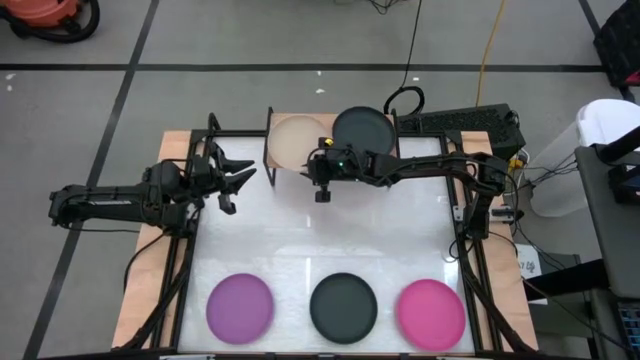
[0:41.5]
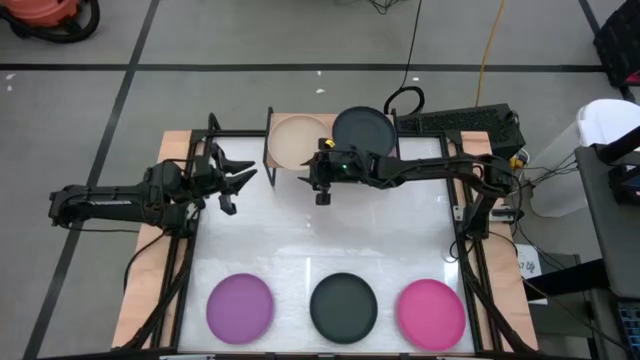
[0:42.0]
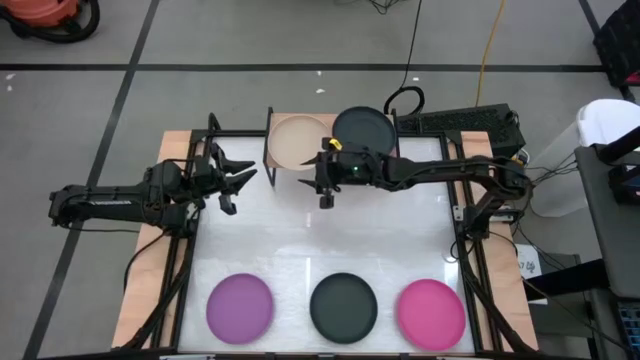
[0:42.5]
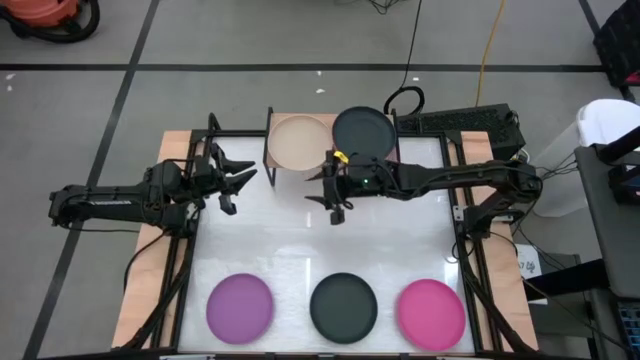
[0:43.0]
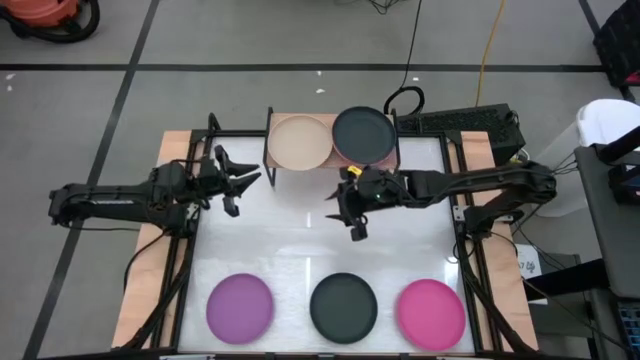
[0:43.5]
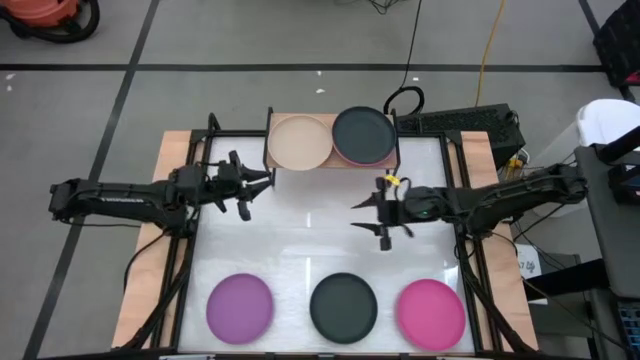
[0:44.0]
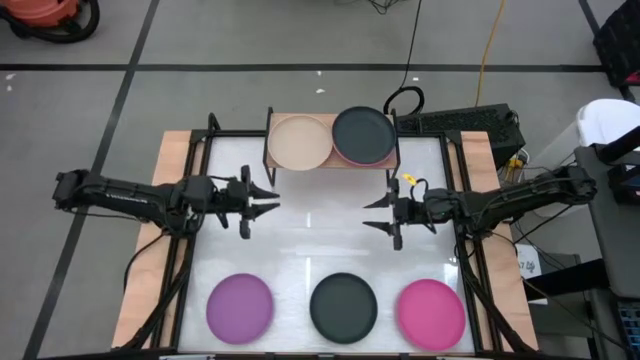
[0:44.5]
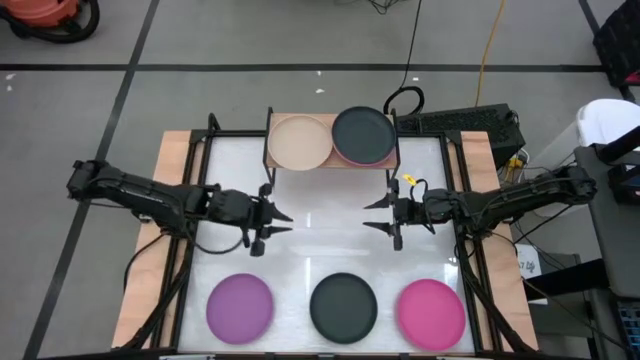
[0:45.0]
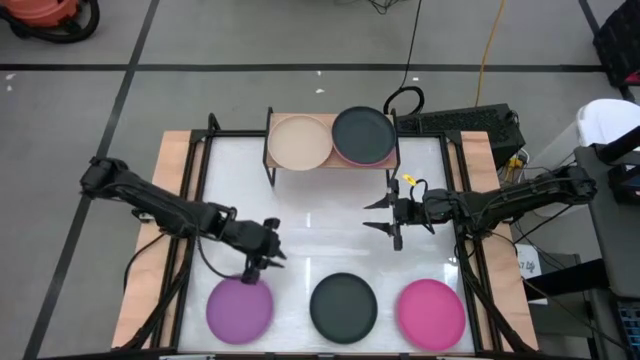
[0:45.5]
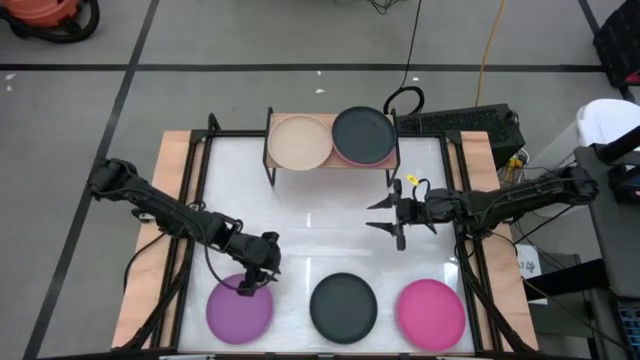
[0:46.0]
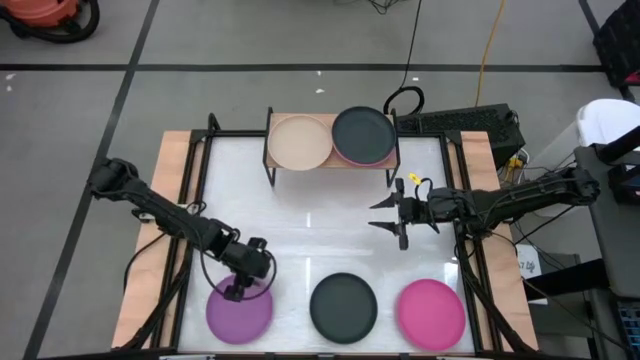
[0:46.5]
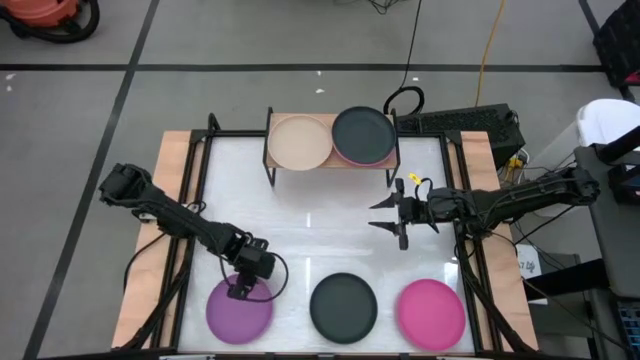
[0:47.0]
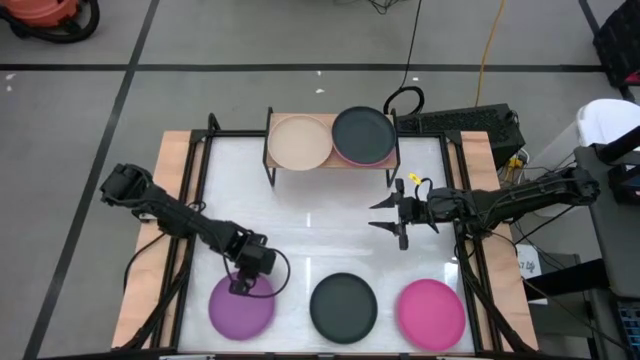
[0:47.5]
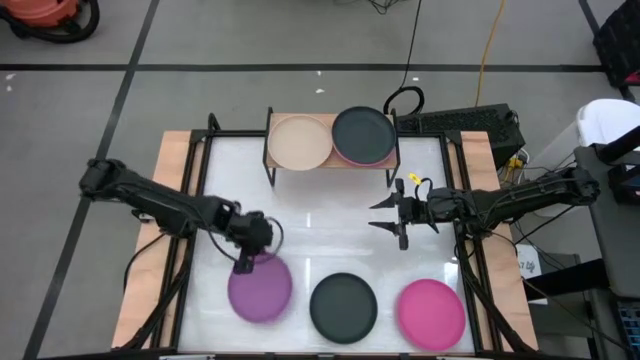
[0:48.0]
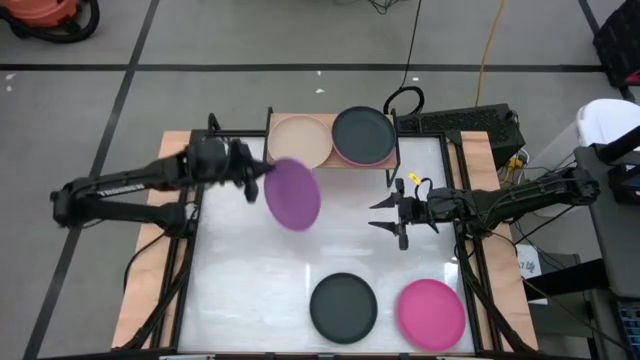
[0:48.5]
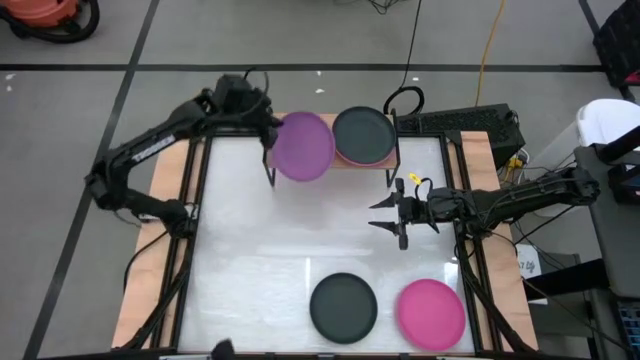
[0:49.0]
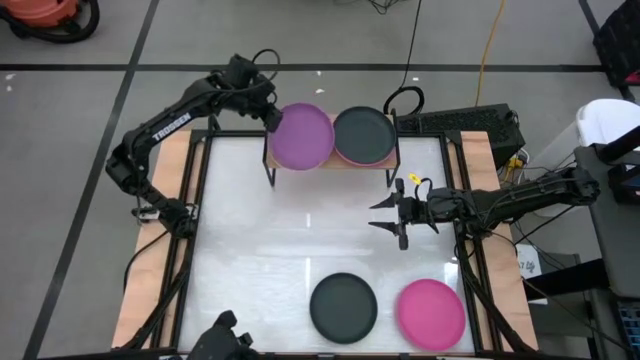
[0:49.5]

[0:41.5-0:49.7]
Task: Place and stack plates onto a shelf
Stack the violet plate on top of the gray plate on the shelf

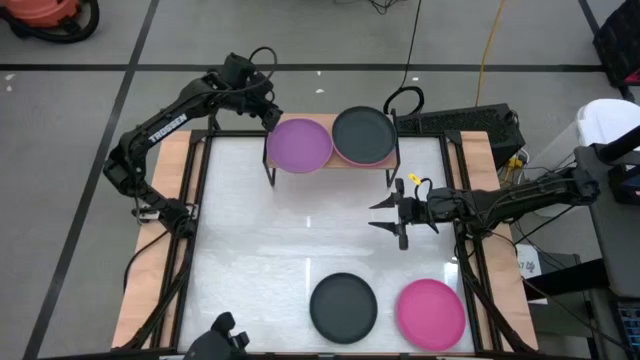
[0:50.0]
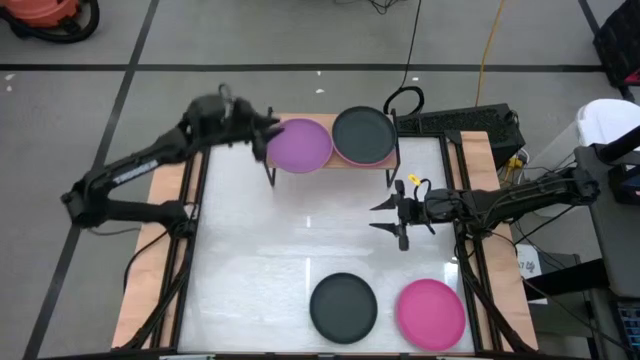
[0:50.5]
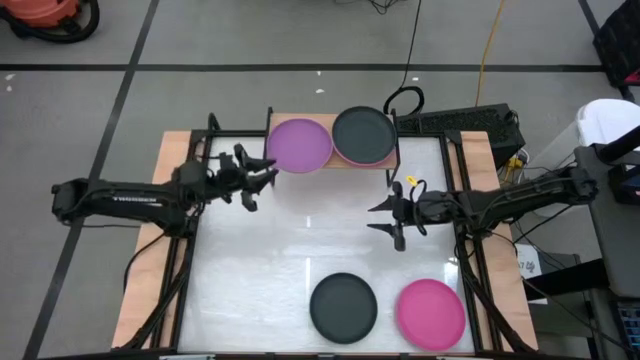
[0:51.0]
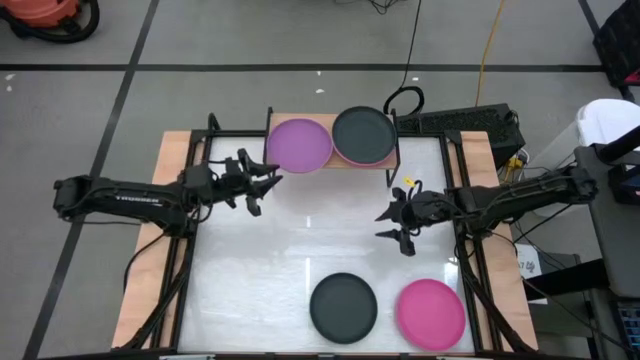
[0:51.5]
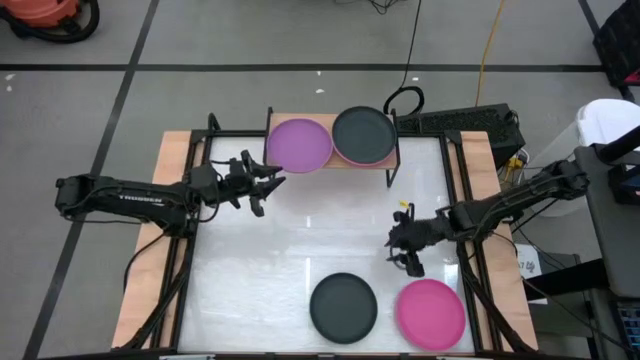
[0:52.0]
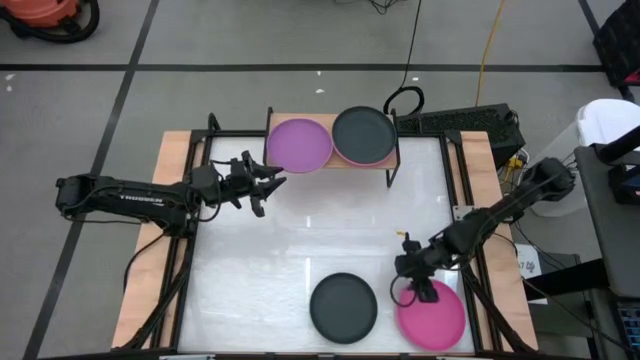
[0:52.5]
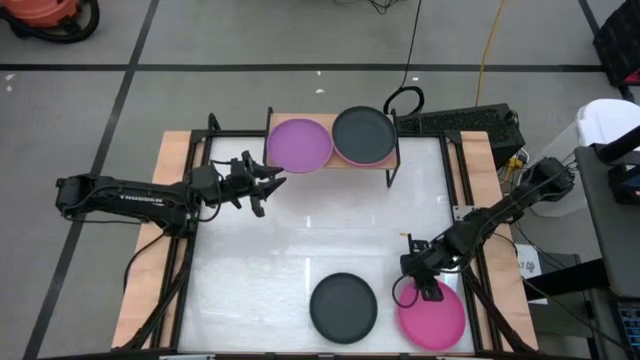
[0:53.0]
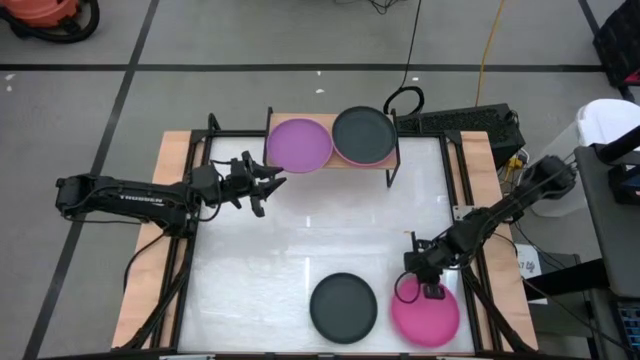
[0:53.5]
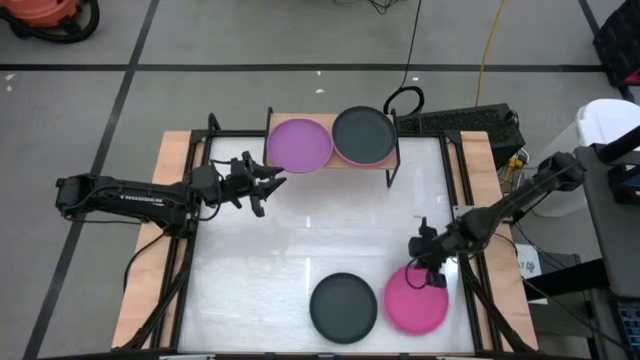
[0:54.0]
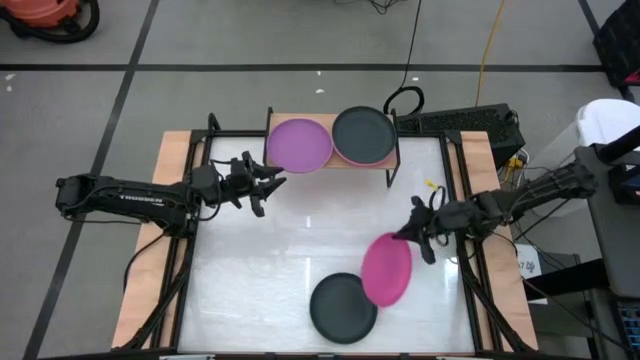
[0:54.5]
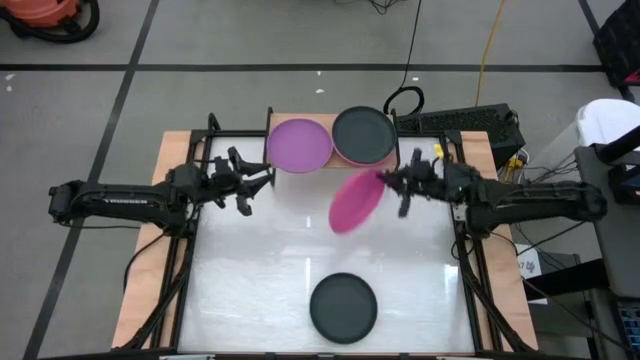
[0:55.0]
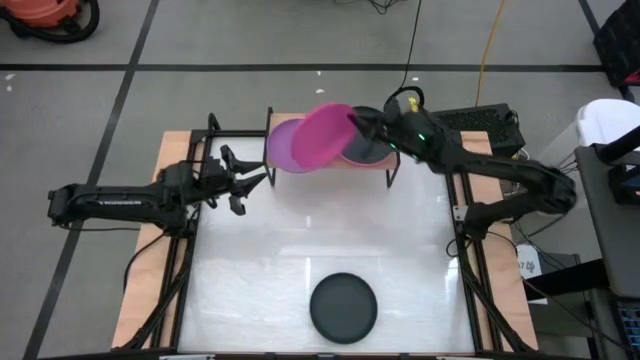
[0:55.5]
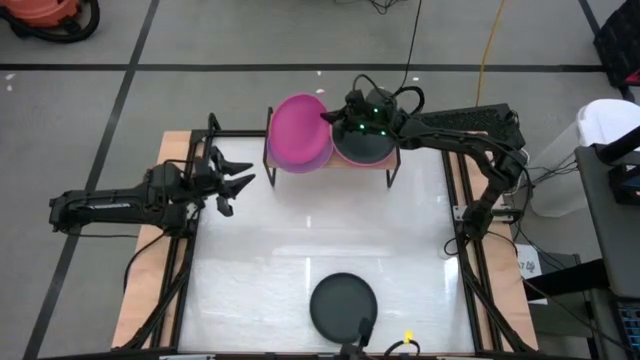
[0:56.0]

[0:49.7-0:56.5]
Stack the pink plate on top of the violet plate on the shelf

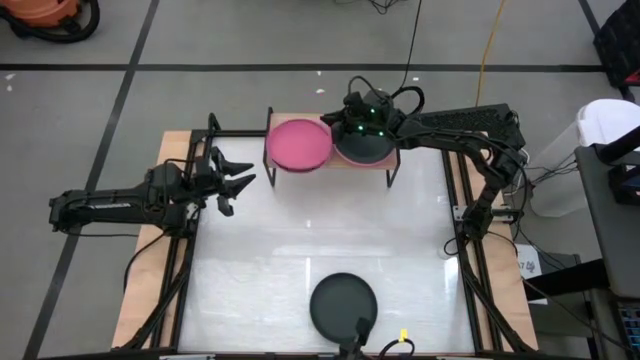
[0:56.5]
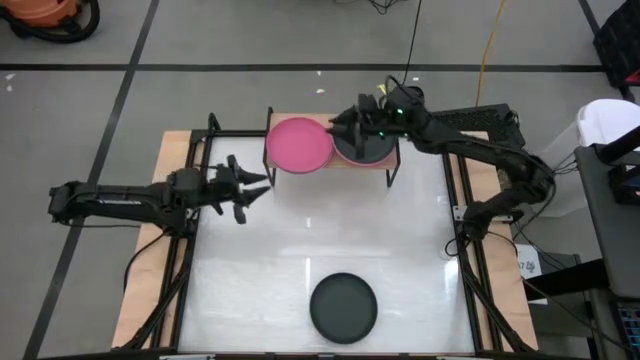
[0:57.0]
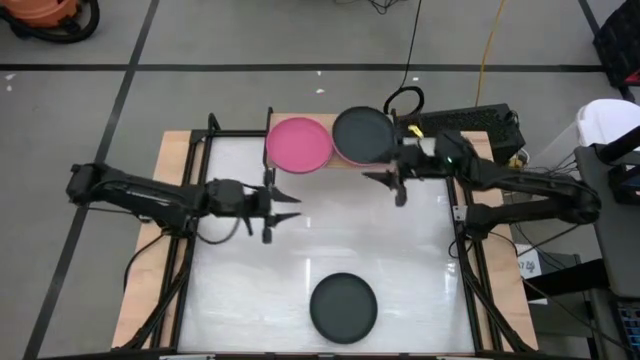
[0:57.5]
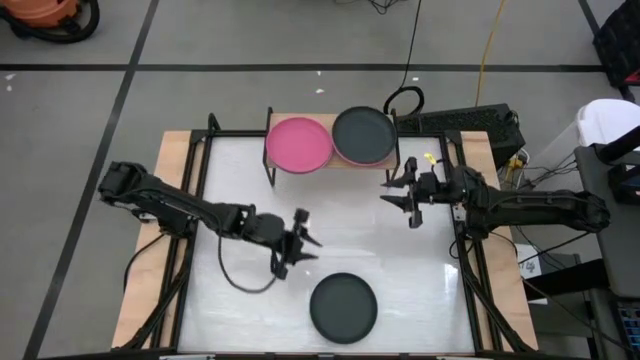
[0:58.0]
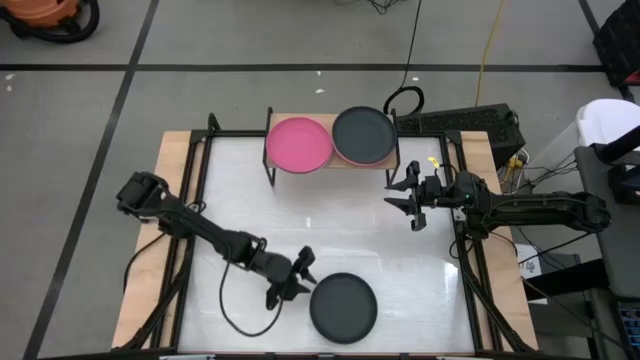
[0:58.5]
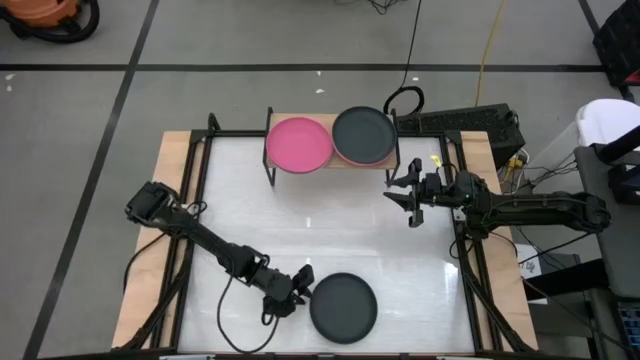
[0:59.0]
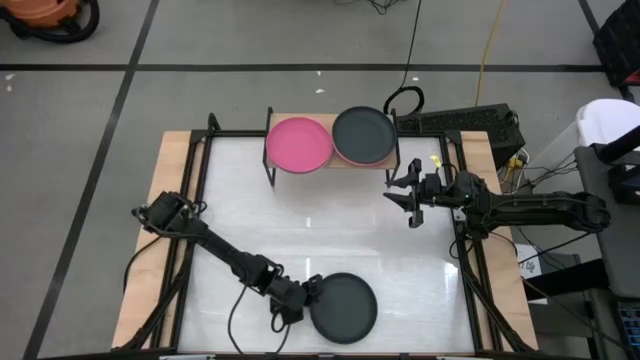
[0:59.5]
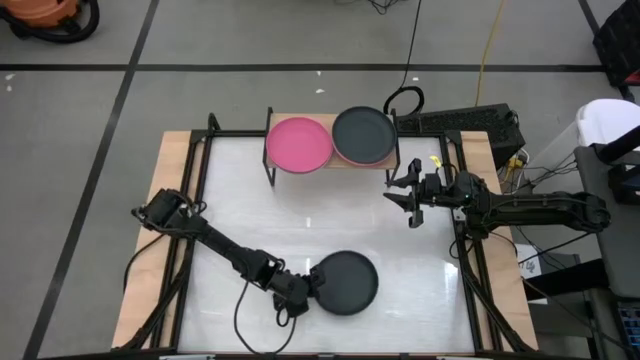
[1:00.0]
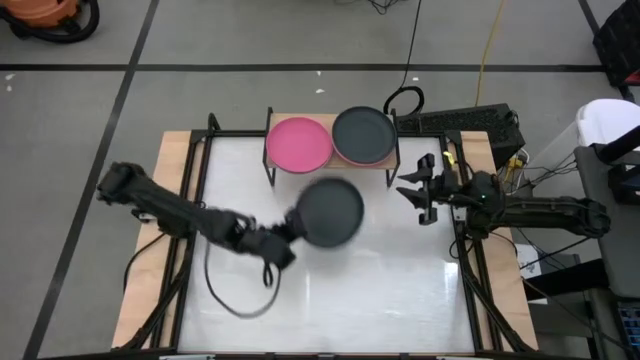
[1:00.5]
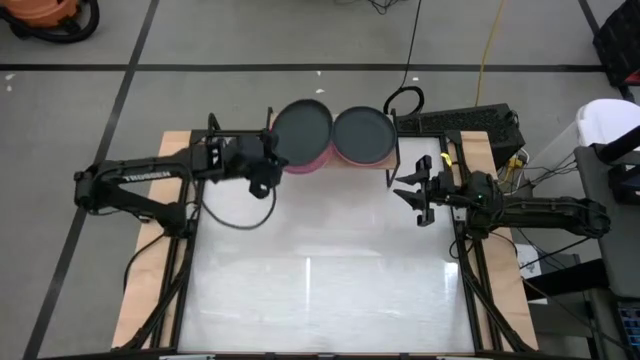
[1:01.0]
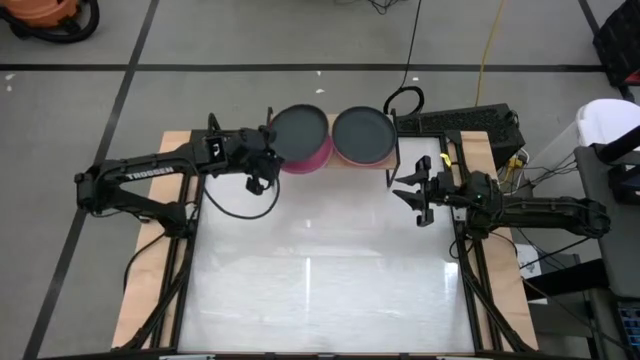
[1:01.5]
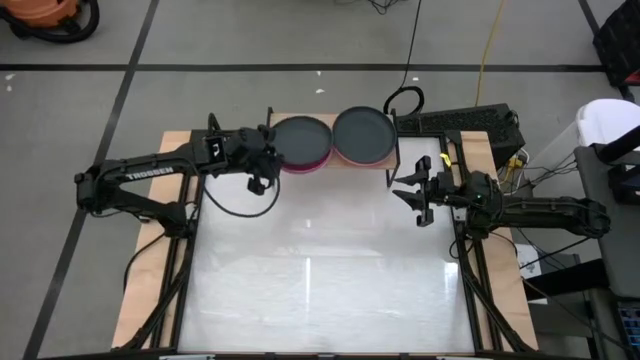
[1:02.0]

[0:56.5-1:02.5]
Stack the black plate on top of the pink plate on the shelf

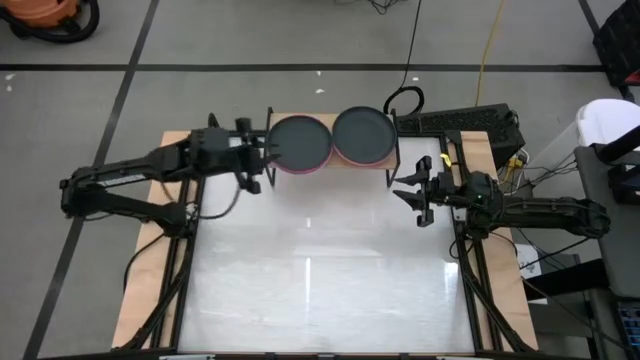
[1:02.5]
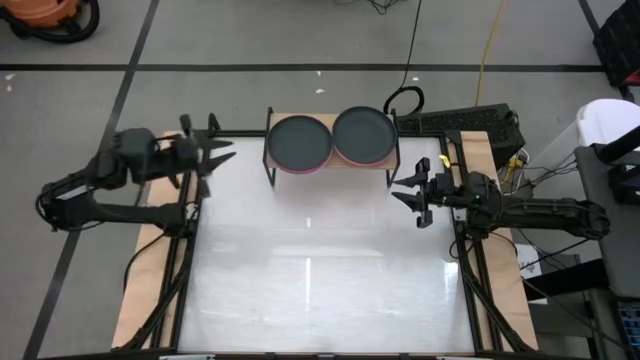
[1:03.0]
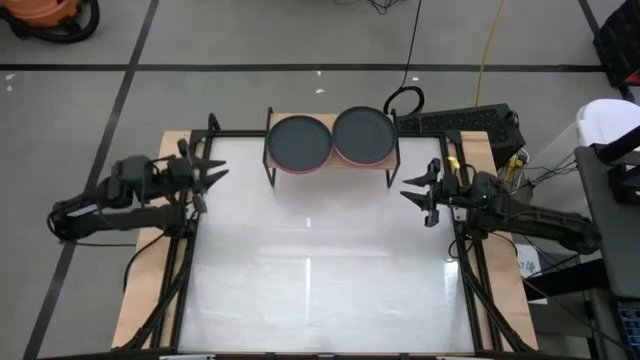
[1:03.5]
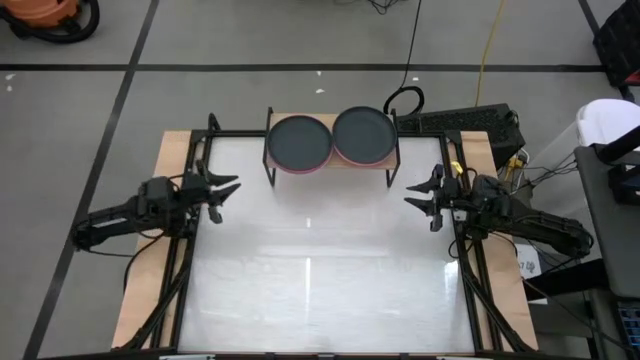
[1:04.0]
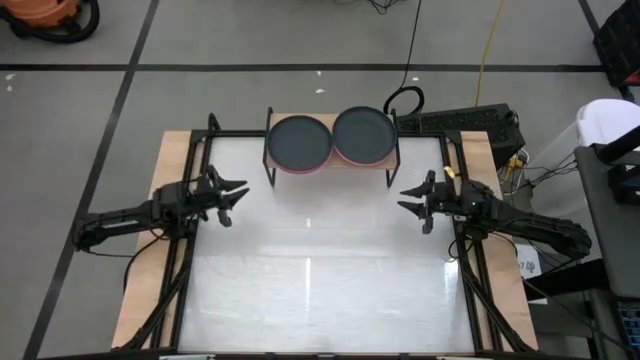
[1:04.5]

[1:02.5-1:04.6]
Return to Home Position
